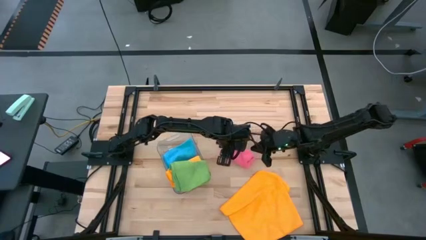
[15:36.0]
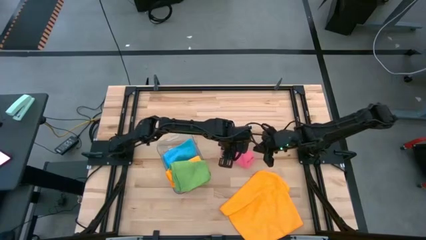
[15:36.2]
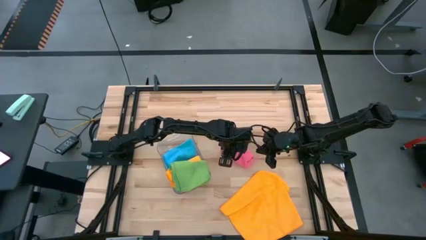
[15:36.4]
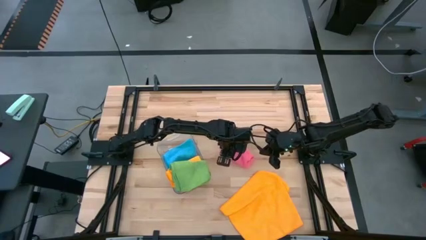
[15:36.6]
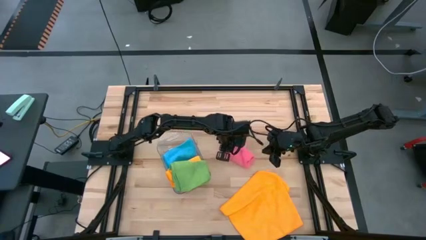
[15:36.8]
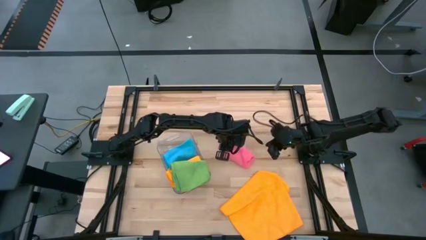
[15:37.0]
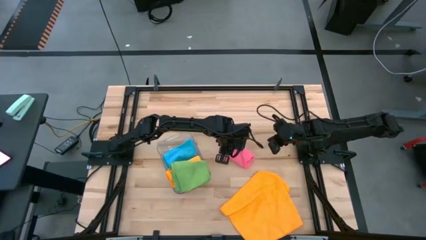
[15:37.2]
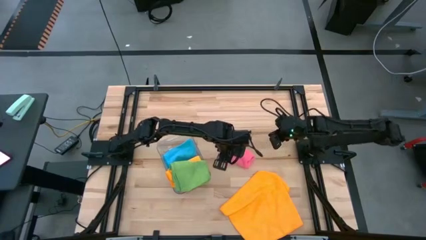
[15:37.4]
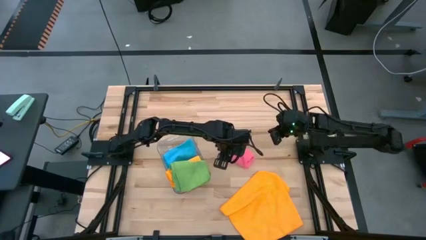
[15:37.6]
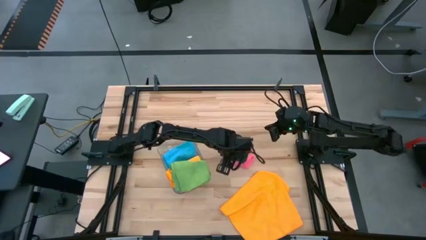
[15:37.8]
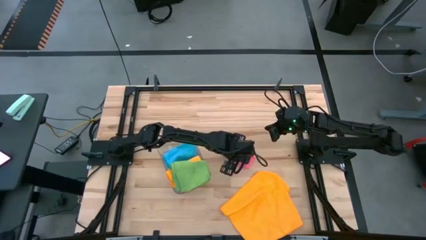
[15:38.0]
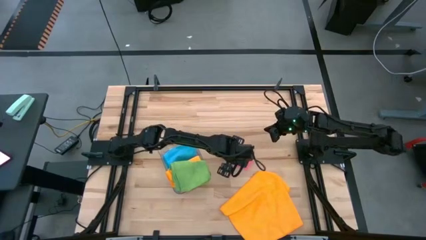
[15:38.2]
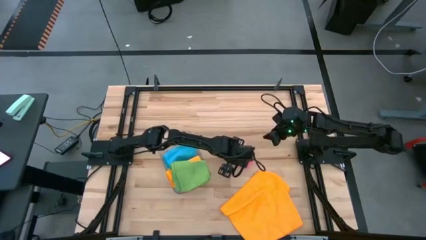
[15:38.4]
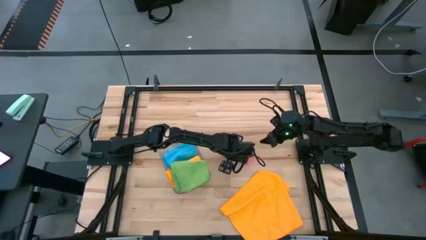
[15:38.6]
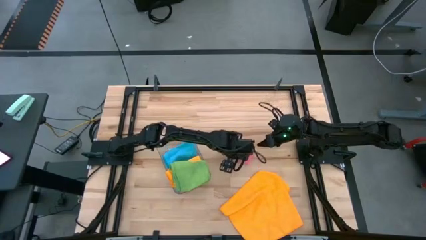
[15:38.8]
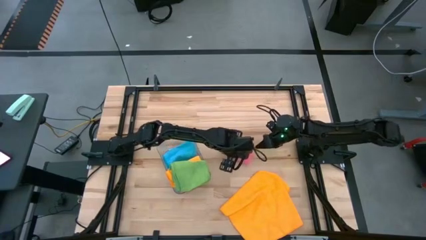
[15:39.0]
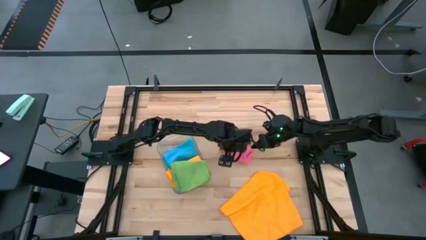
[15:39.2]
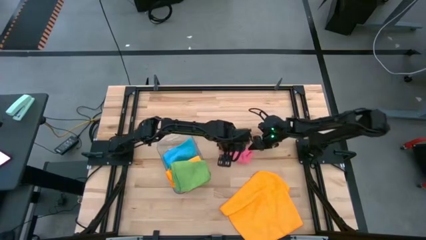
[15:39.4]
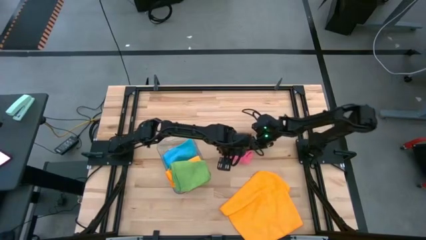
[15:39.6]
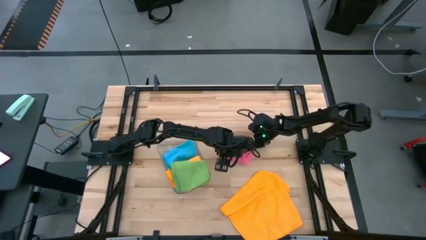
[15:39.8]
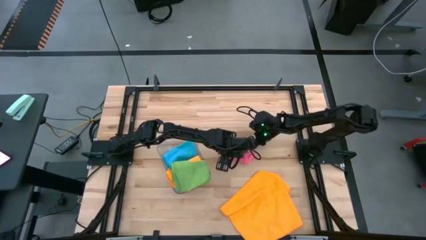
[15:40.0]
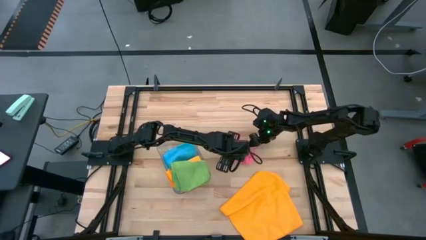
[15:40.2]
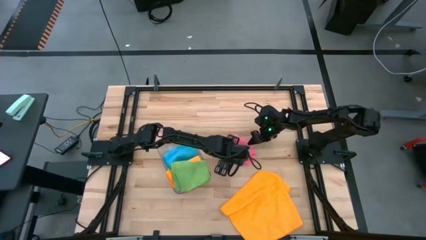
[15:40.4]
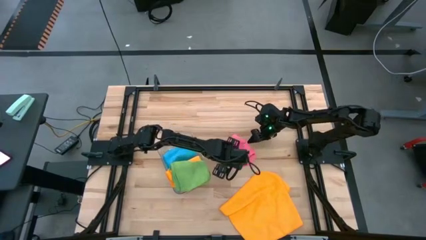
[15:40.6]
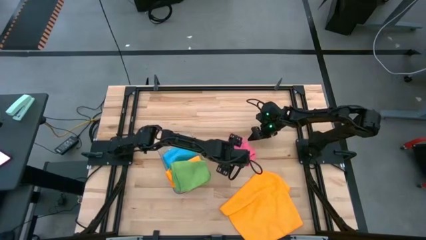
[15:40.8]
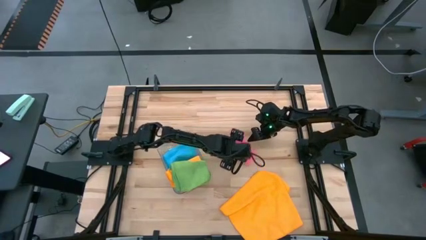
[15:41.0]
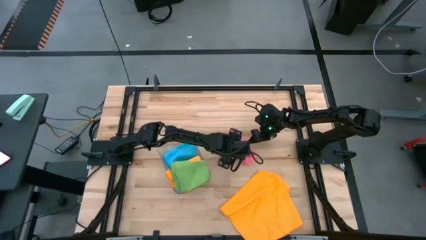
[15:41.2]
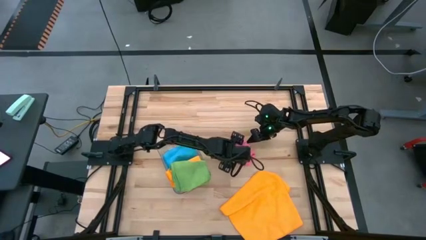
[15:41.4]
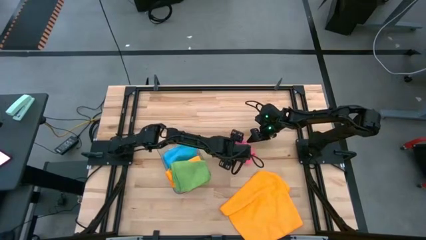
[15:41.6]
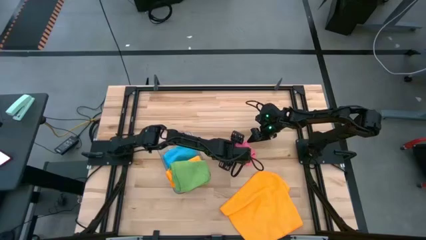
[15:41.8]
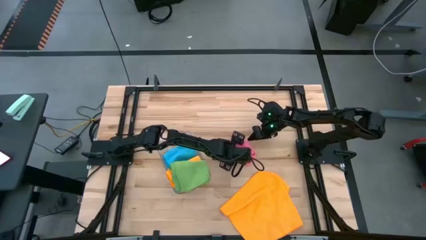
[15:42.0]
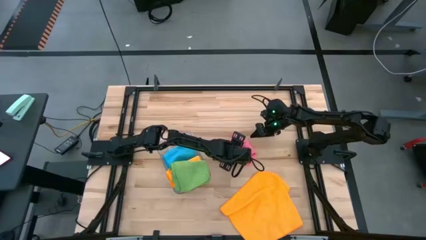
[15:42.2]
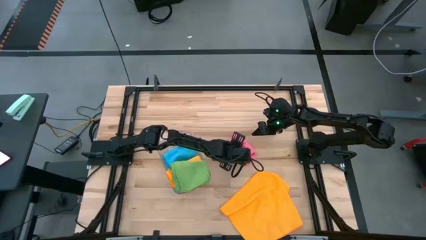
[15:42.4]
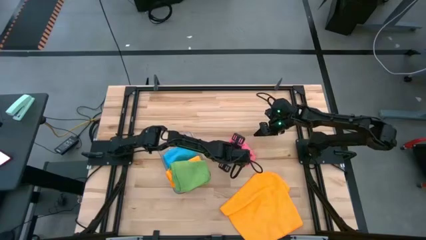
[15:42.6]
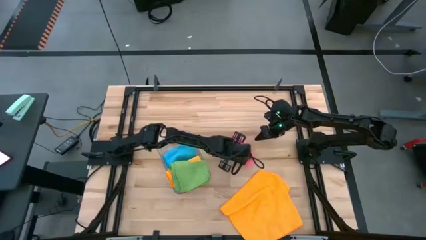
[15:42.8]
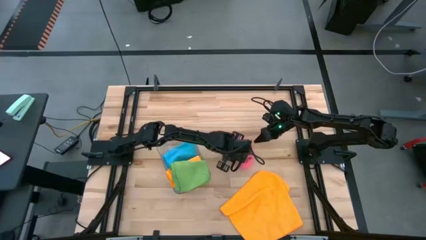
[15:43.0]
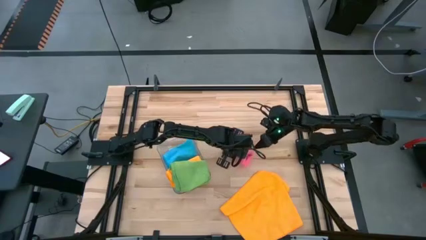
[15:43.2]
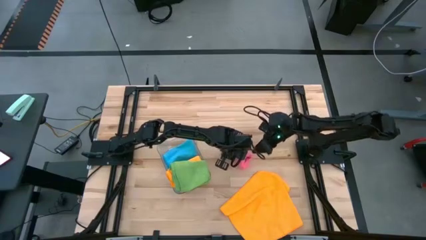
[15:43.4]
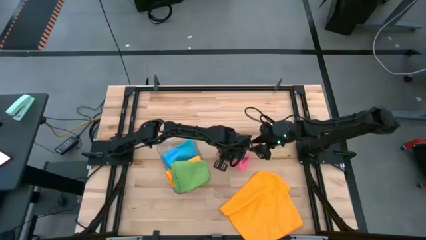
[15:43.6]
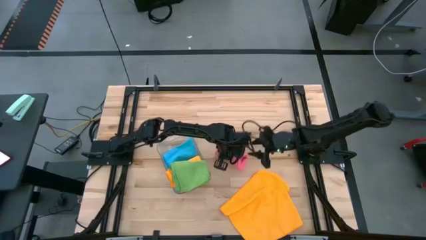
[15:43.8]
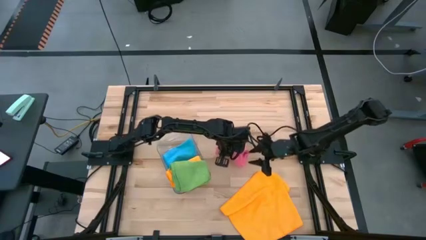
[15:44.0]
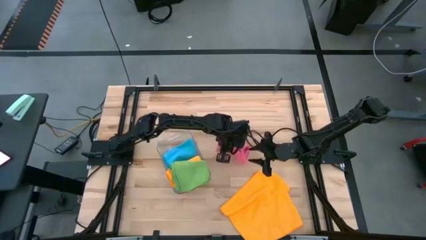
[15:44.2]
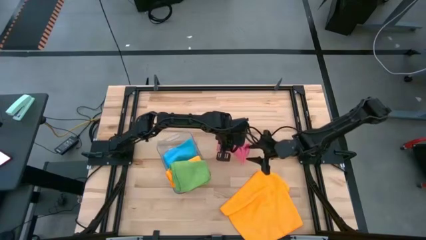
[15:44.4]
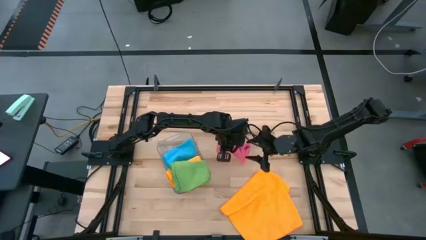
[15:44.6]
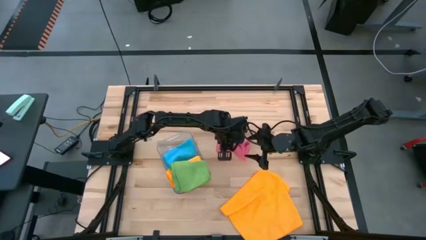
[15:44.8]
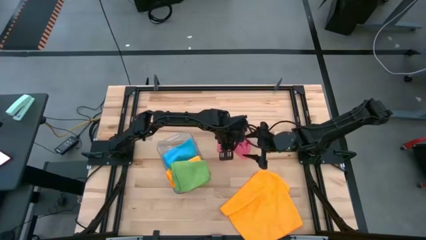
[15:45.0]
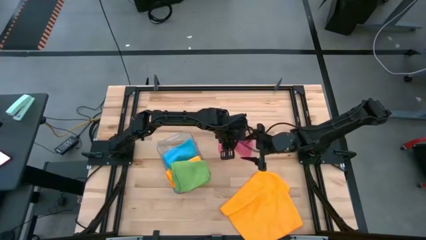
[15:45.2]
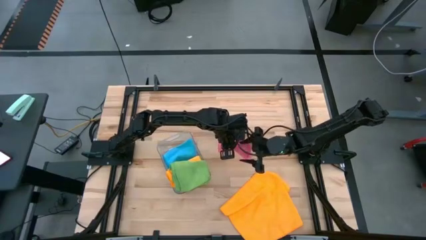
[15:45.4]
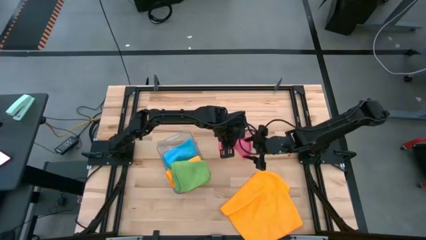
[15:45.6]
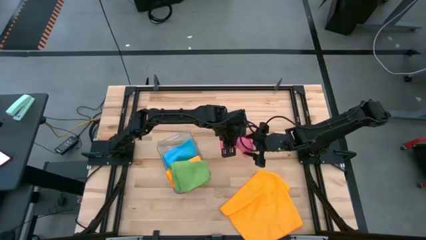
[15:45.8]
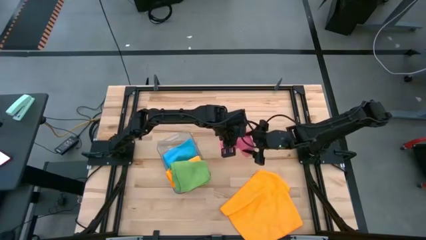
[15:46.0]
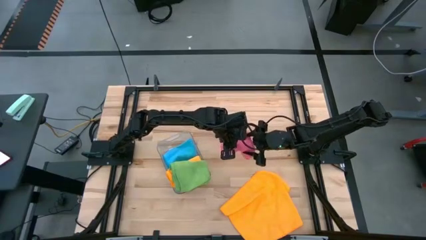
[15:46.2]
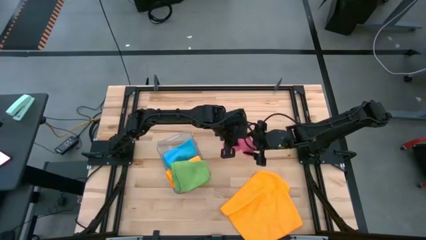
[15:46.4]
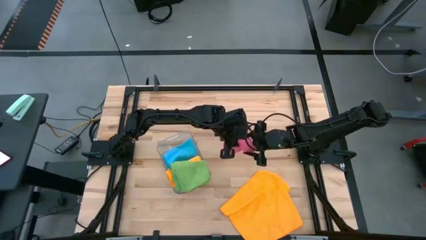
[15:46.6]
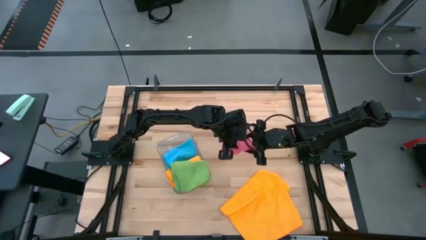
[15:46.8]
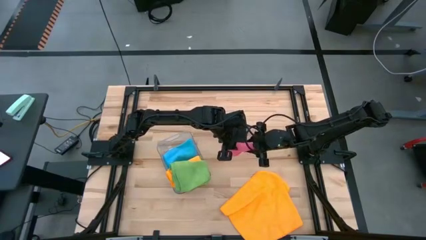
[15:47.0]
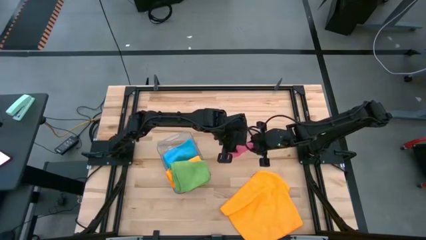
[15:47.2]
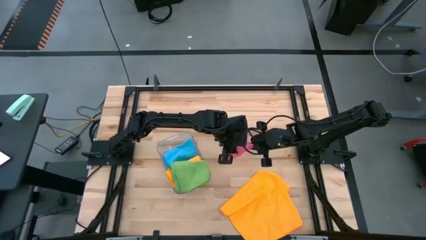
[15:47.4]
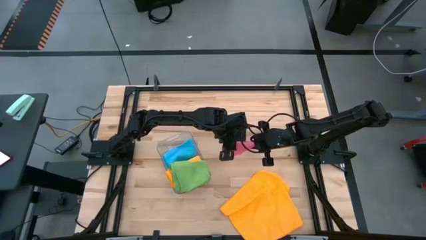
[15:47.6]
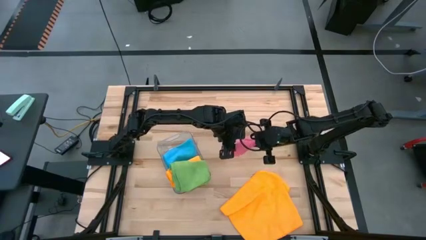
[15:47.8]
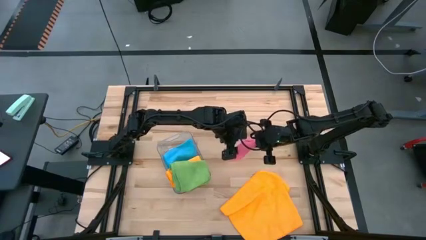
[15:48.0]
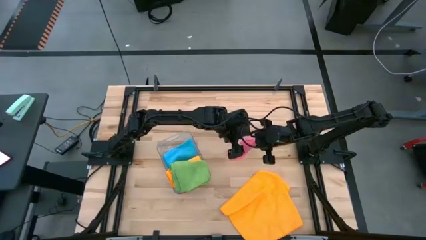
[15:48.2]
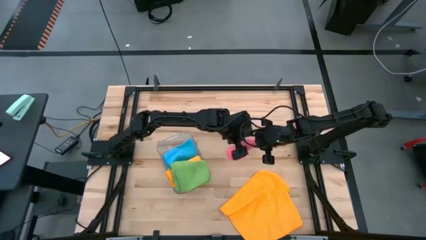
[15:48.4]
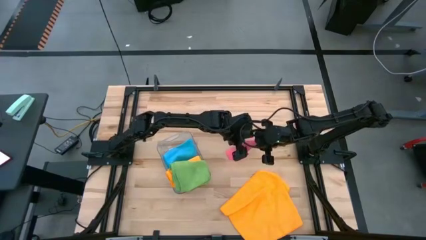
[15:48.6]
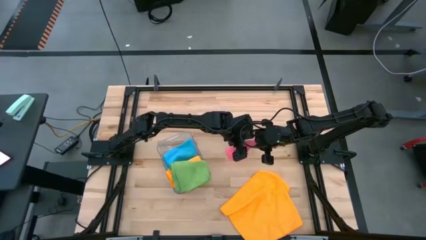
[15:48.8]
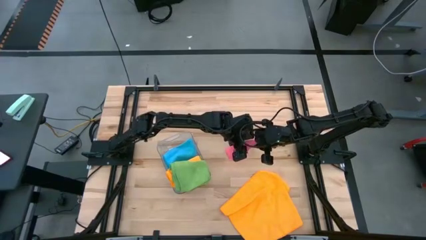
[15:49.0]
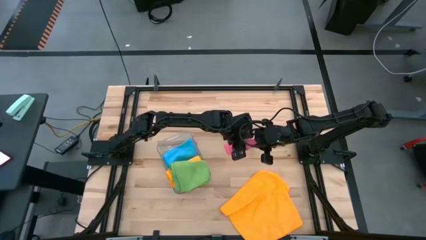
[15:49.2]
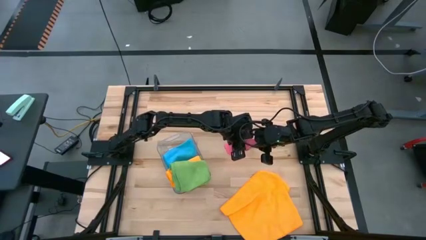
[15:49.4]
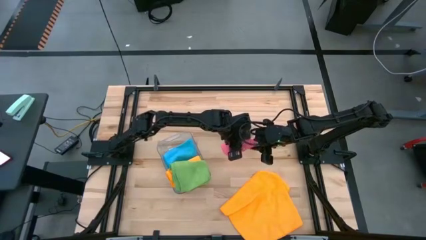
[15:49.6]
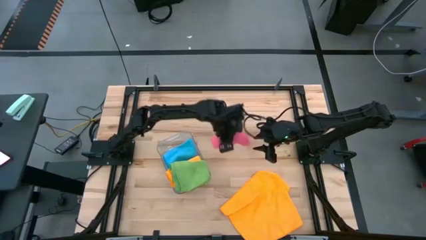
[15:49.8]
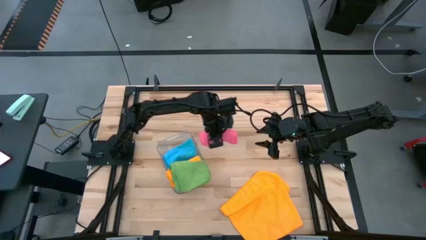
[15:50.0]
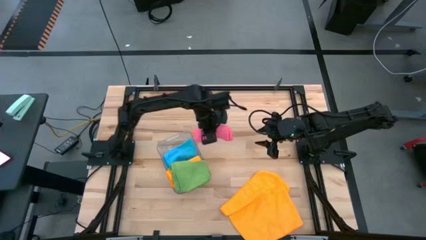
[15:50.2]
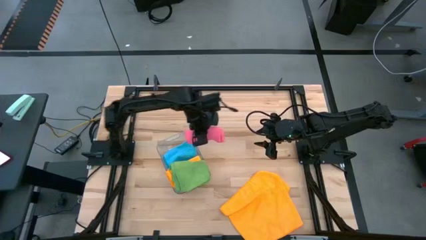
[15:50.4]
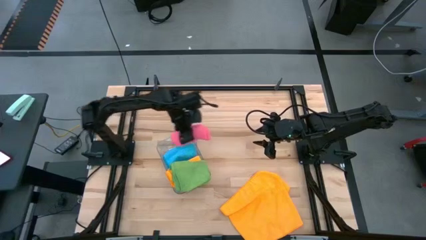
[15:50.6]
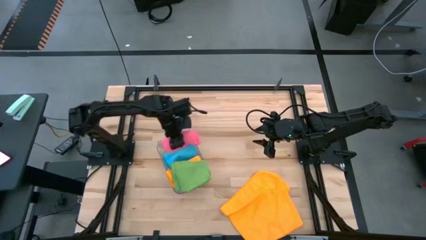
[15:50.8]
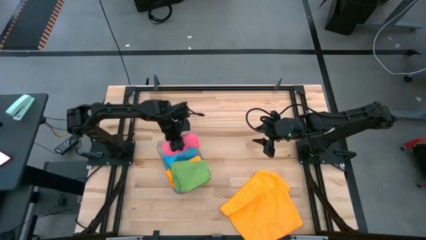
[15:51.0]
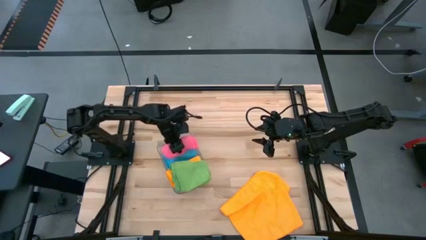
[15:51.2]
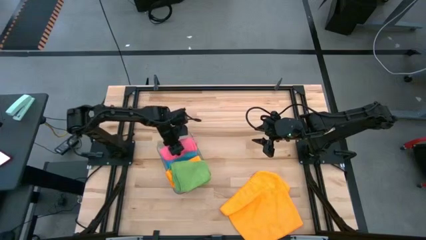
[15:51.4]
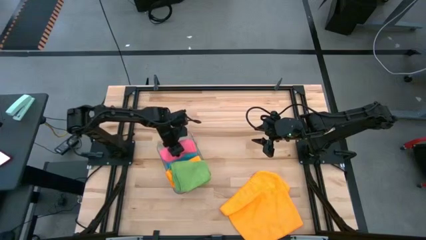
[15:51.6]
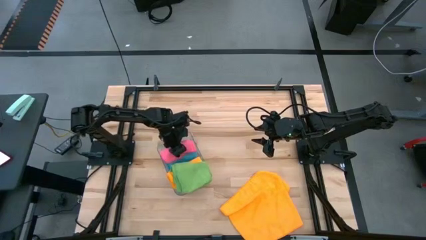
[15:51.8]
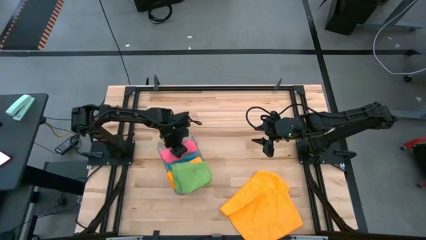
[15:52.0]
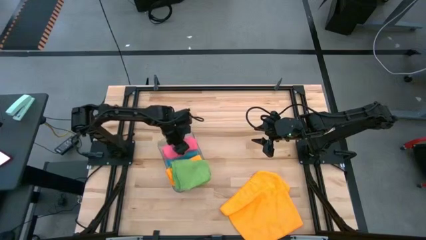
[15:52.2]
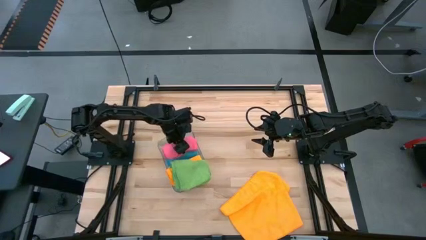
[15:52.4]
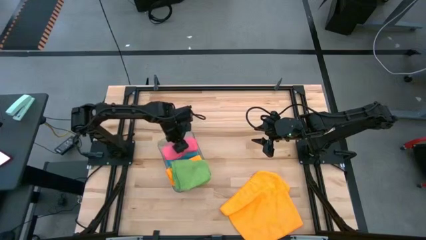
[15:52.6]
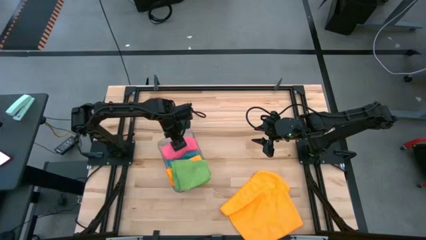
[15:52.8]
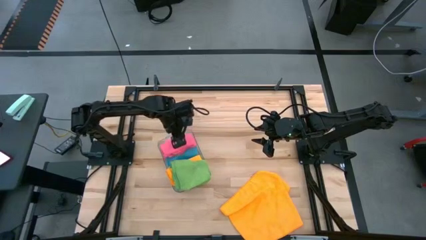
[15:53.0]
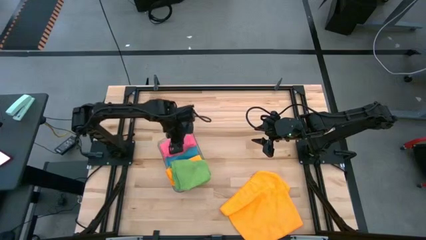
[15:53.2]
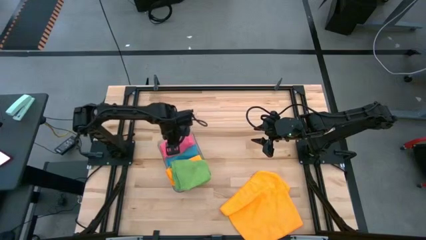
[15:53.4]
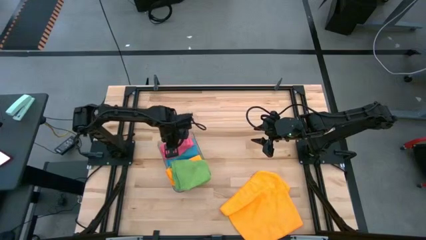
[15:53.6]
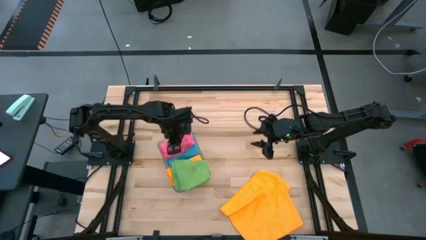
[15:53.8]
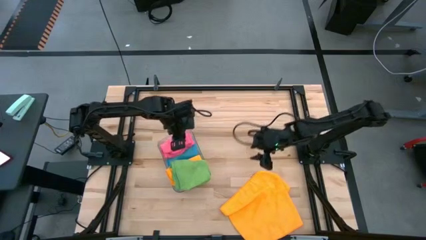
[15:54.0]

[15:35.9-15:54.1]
Task: Fold microfiber towels
Put the pink towel into the transparent bin
